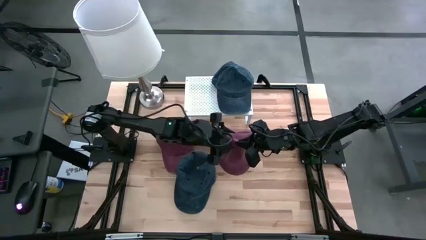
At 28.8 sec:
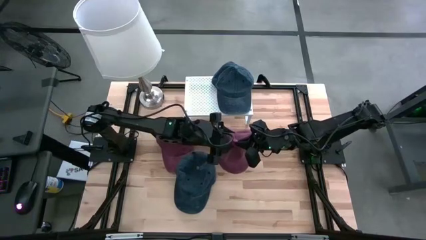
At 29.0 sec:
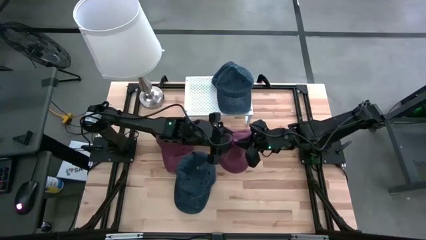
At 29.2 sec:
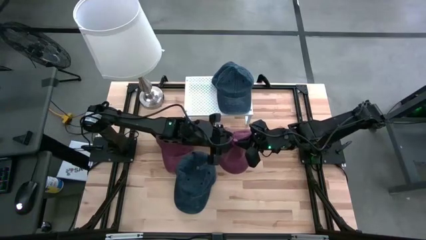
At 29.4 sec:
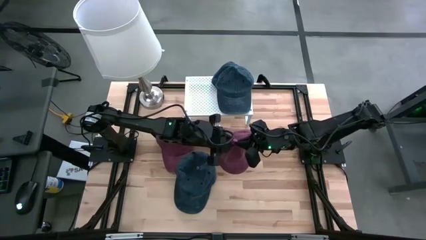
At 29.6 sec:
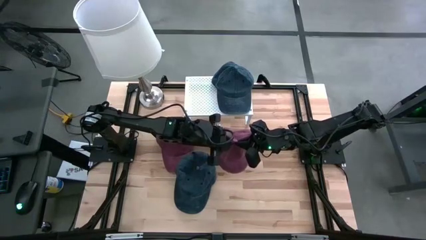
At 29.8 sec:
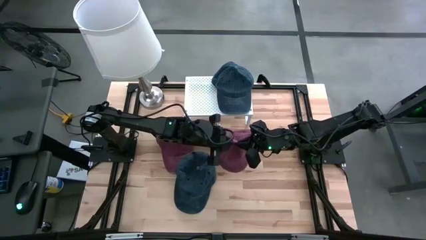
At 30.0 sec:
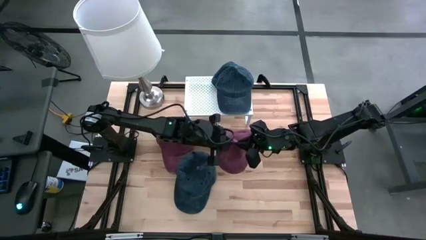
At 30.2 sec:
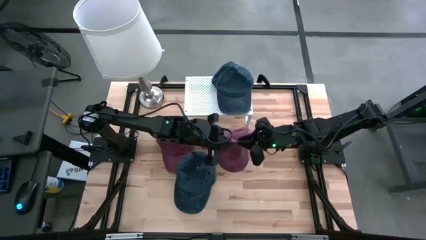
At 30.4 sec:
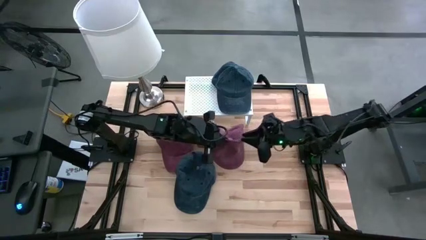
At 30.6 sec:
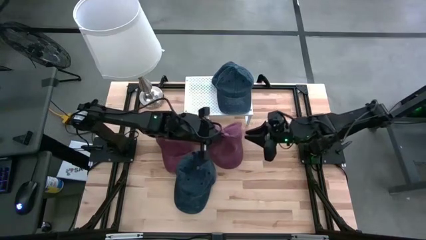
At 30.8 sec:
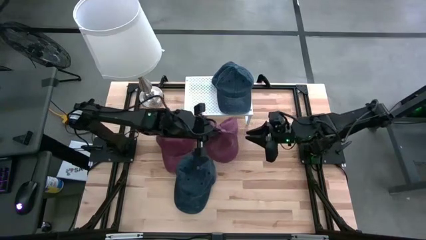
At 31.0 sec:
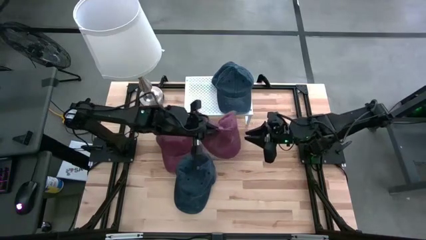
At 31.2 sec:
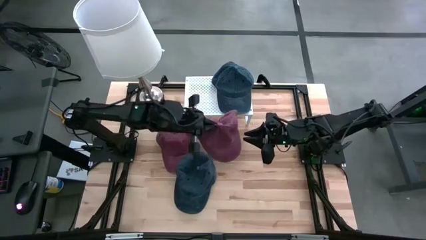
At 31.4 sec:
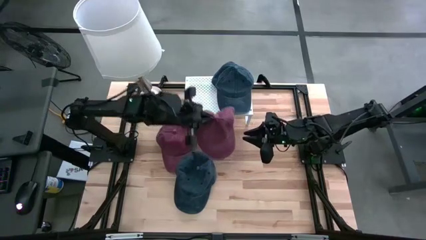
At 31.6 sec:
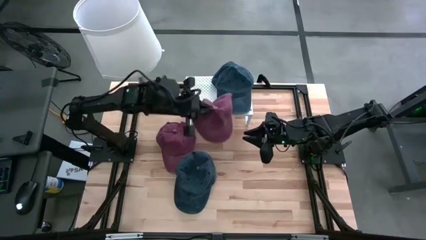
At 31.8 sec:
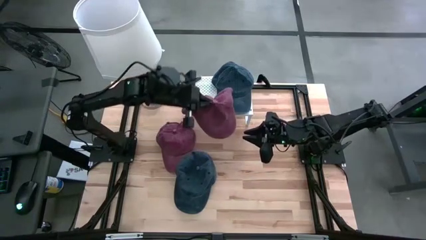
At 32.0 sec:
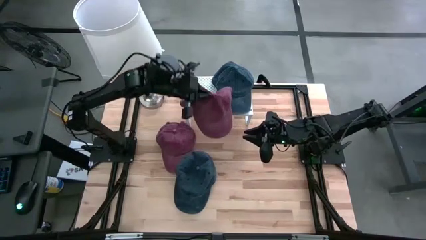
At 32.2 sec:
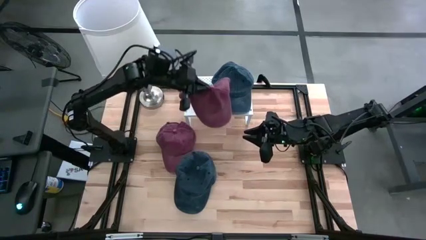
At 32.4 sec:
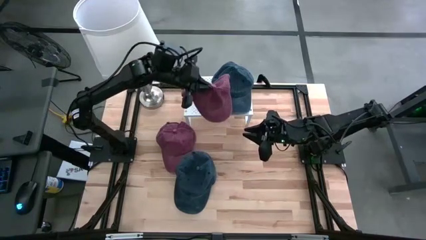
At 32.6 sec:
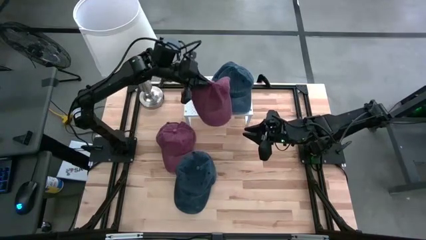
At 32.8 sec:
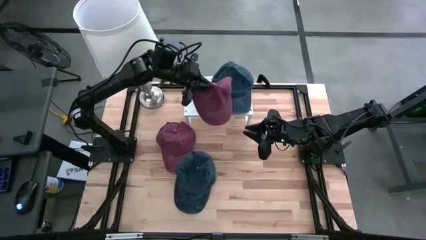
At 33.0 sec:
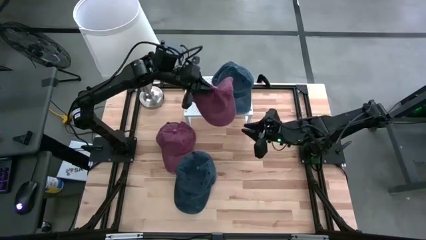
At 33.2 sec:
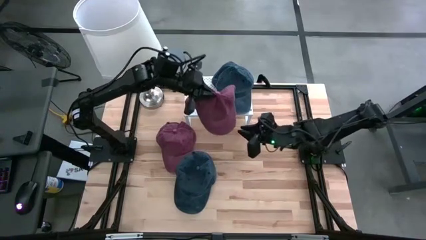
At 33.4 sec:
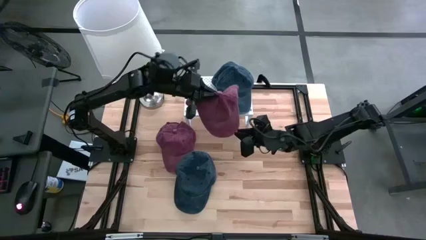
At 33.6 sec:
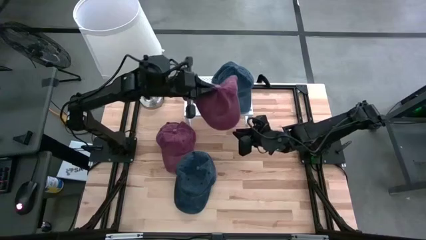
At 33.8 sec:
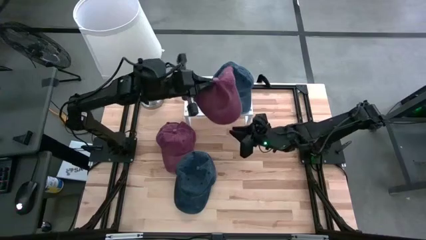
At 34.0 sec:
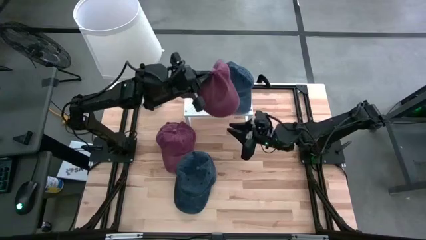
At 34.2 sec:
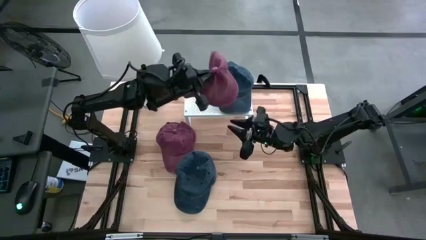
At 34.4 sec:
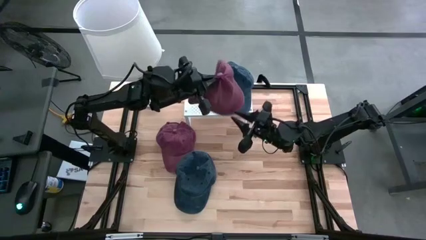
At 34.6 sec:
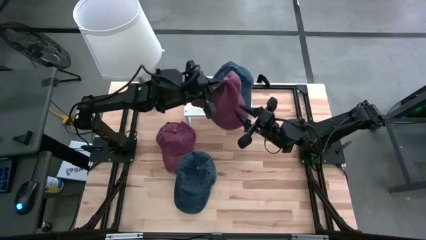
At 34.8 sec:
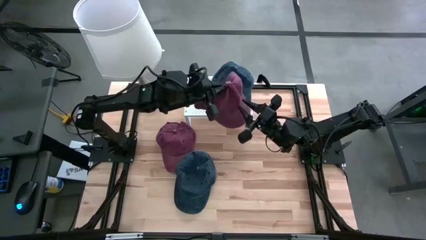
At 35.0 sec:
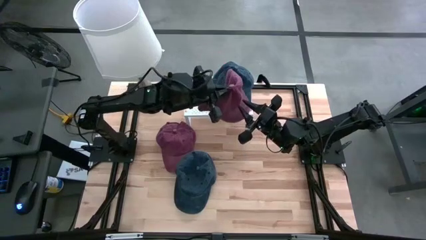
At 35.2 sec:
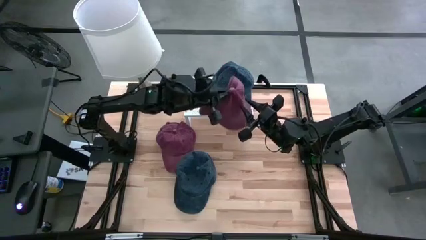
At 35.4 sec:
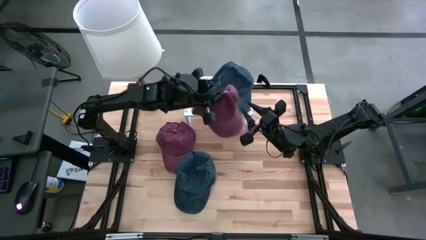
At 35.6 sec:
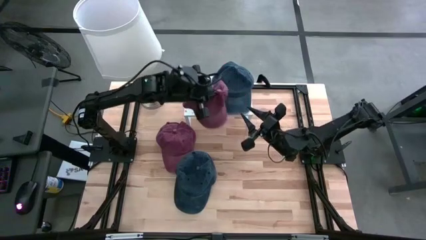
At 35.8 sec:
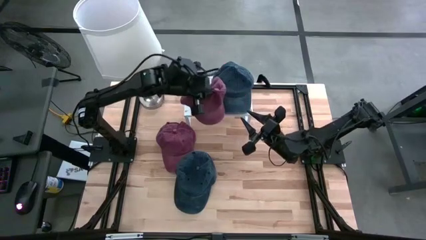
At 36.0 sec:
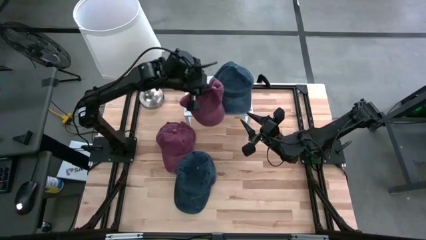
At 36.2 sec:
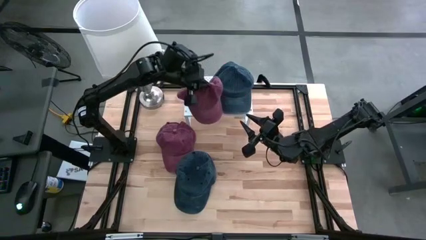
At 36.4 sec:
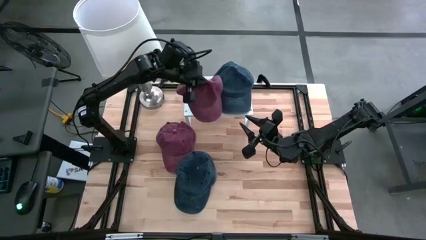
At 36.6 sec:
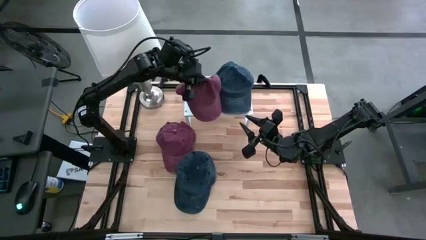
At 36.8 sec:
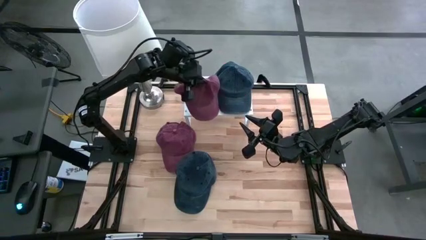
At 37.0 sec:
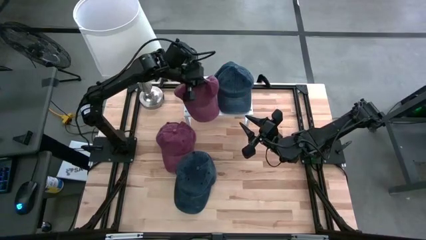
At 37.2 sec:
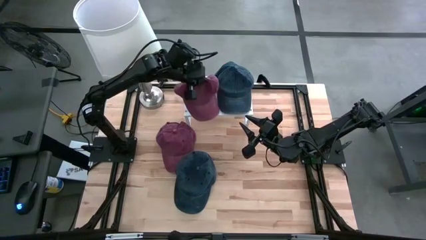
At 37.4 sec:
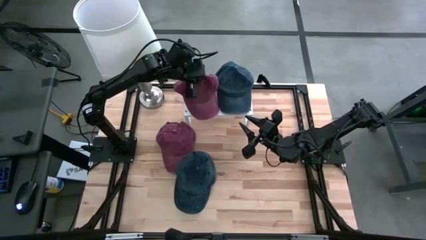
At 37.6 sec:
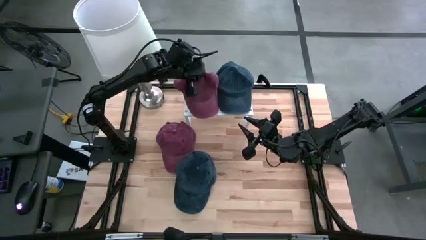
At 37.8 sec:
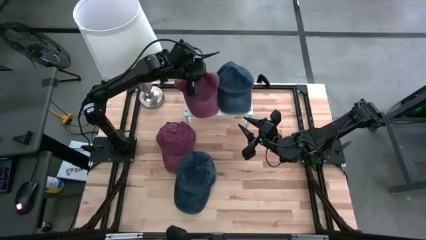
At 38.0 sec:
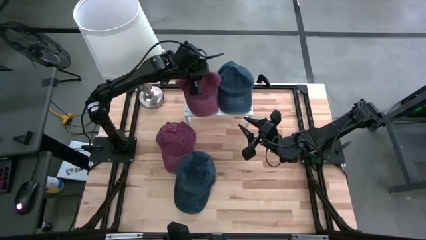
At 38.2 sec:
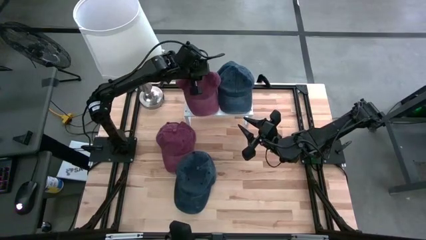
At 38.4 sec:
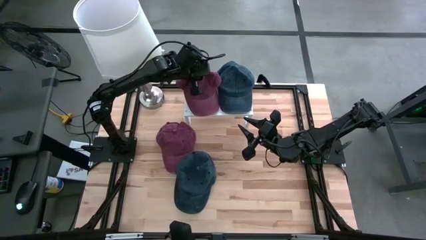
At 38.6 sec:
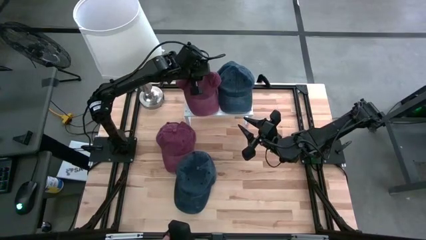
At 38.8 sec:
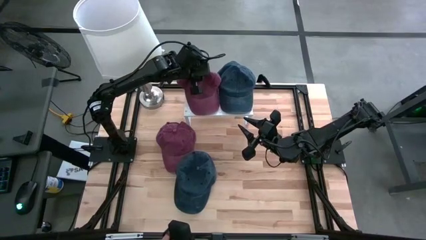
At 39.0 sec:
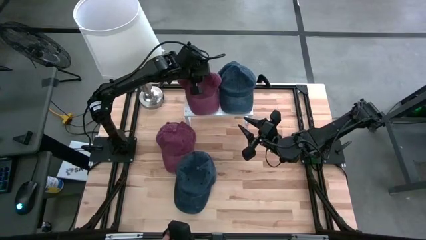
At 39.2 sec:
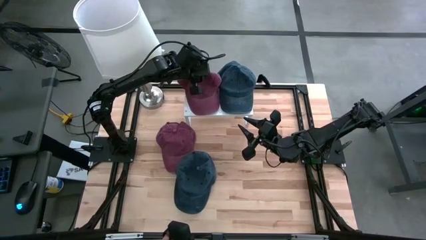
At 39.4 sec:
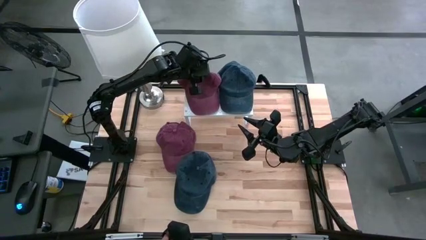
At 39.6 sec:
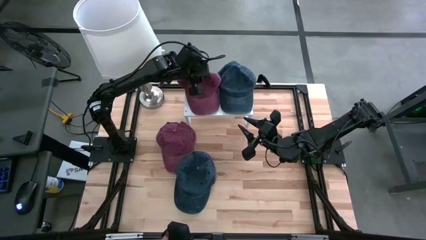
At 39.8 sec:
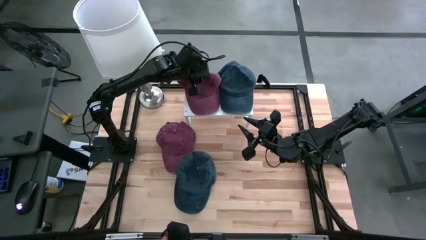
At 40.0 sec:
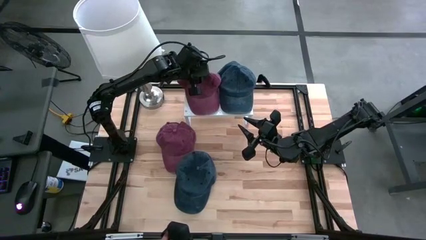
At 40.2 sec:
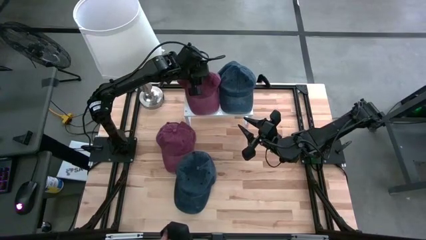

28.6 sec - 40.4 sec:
Task: Pick & Place hat
Put the bottom red cap on the shelf
